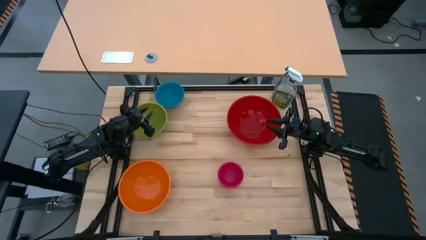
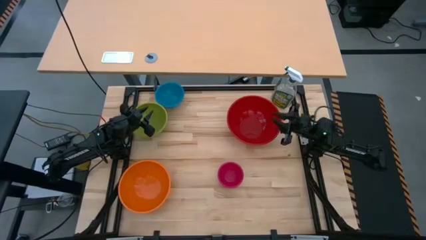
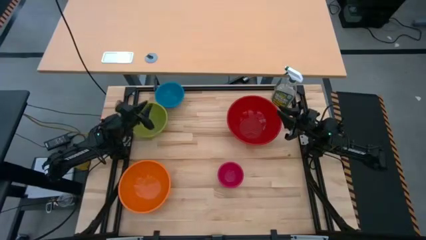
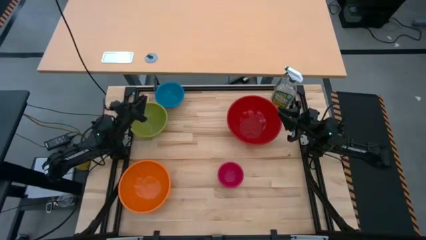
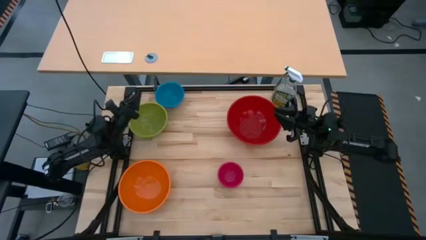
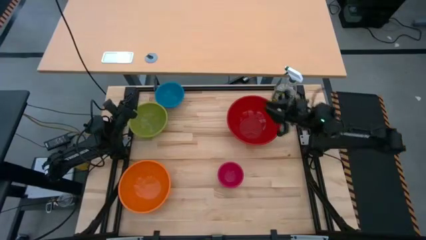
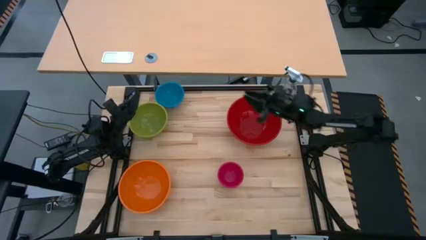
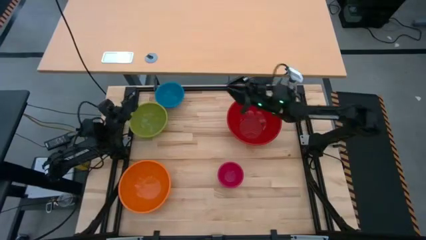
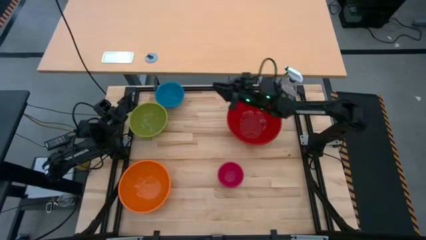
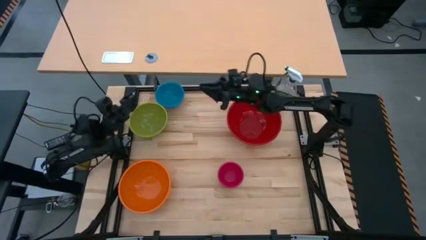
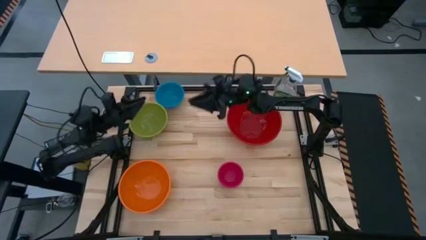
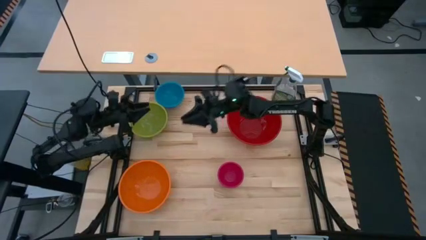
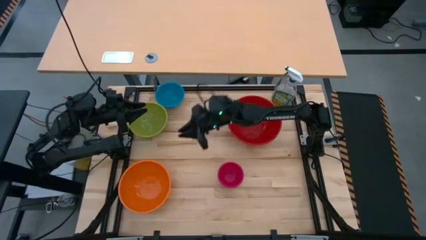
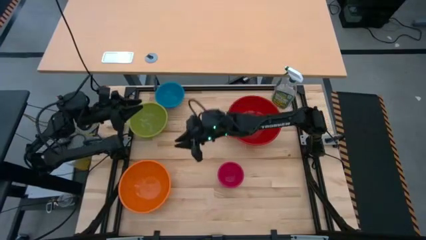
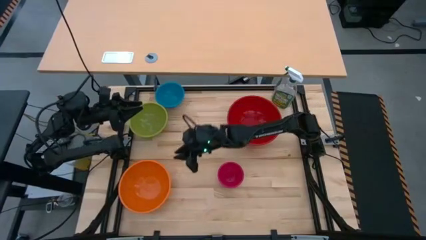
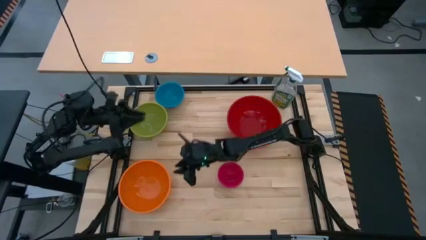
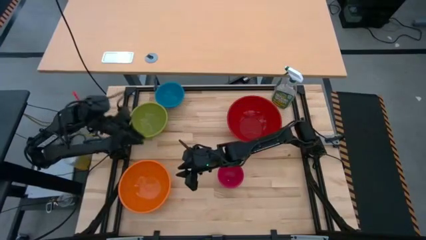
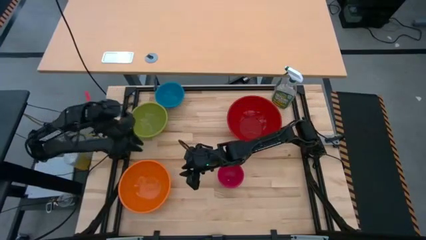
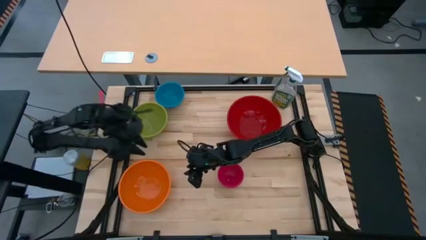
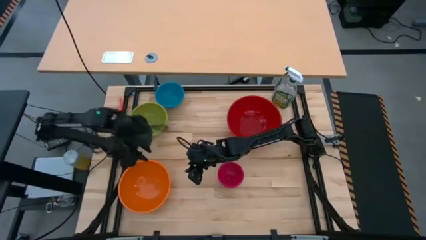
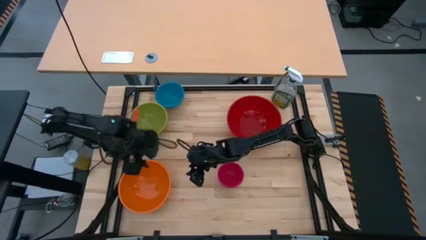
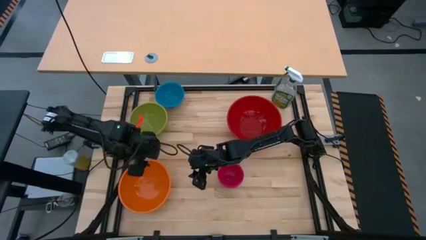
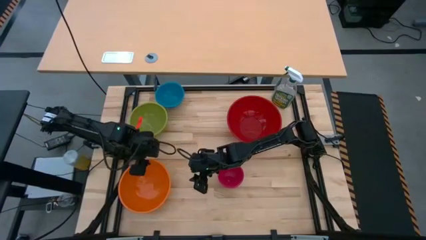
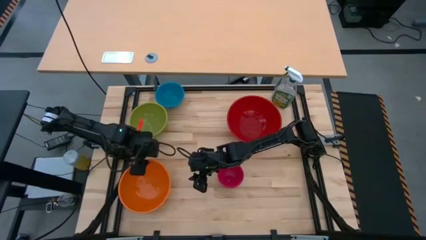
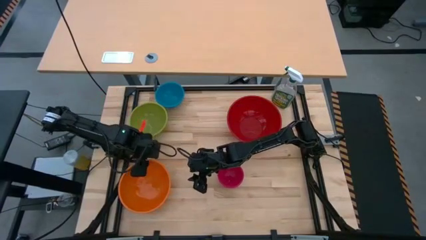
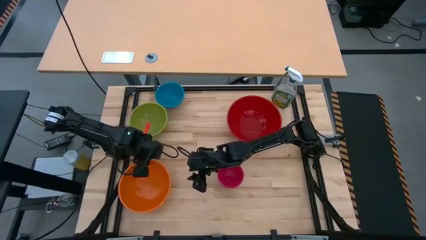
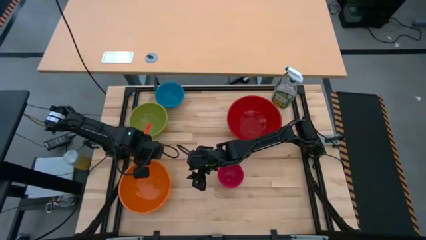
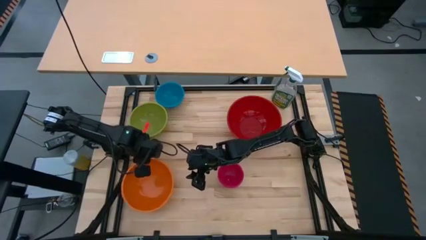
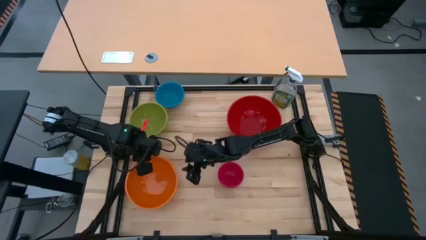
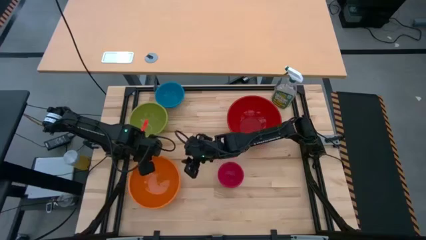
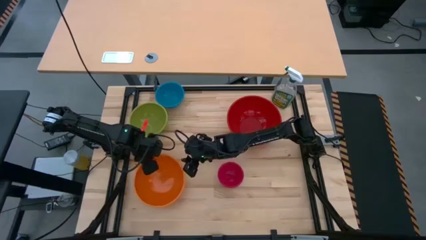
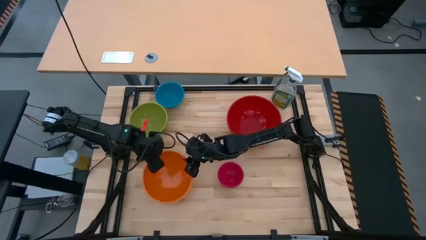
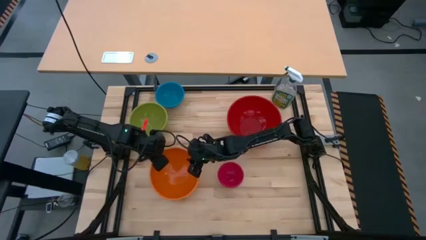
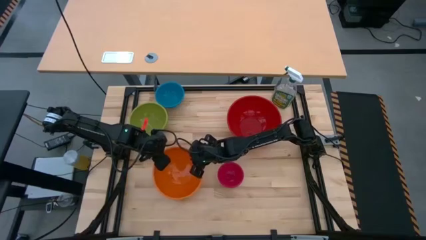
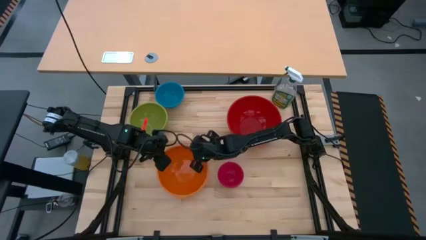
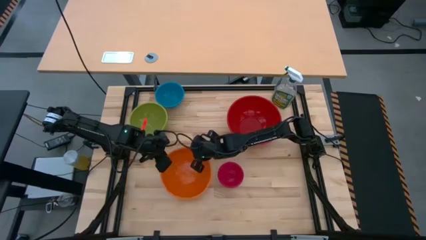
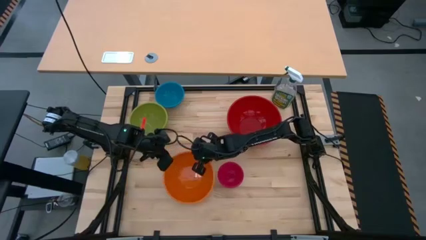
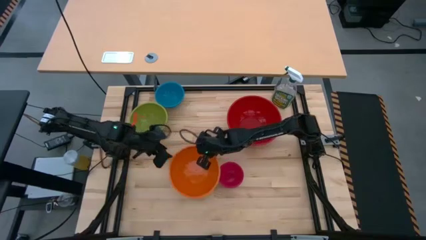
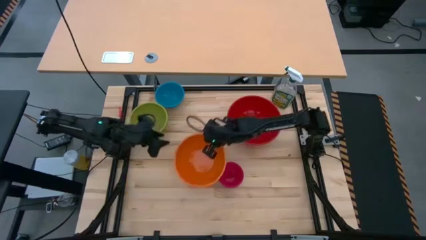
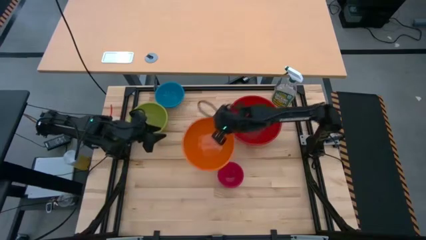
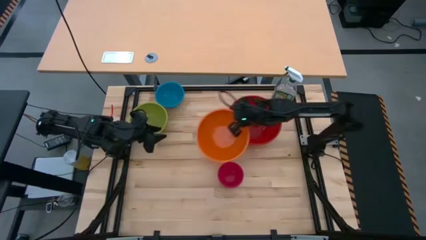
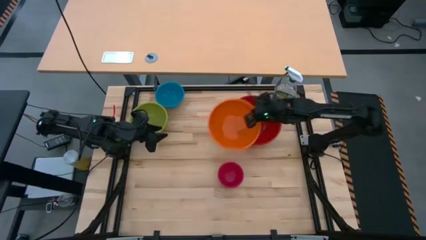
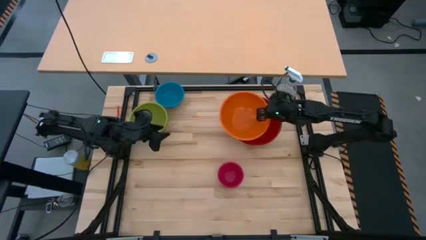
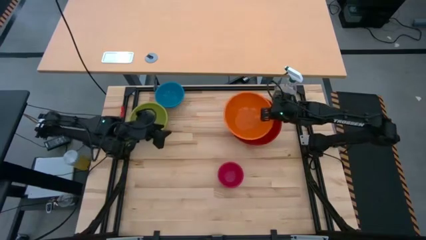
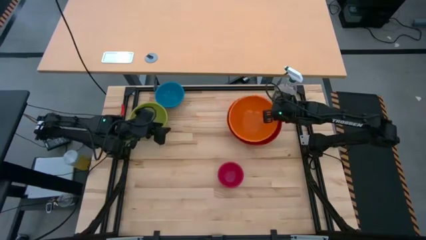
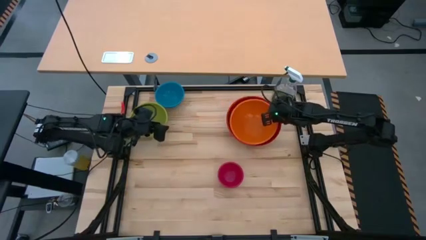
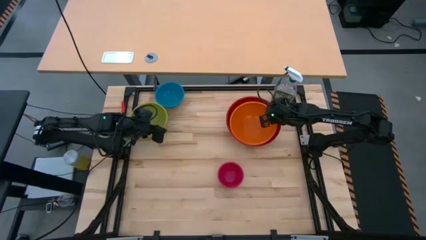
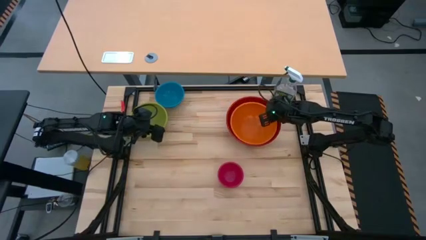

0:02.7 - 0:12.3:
Stack the orange bowl on top of the red bowl

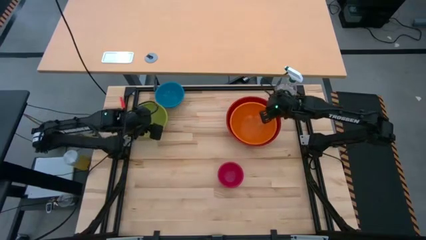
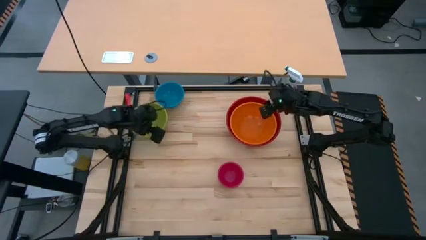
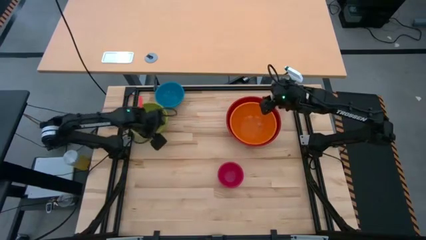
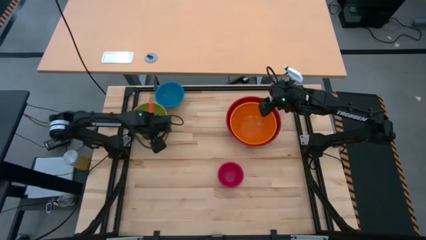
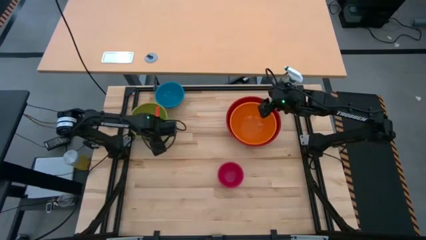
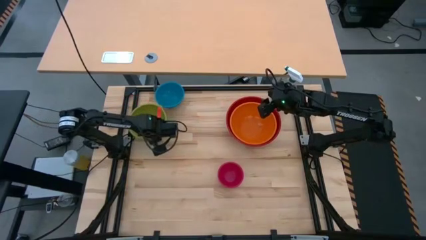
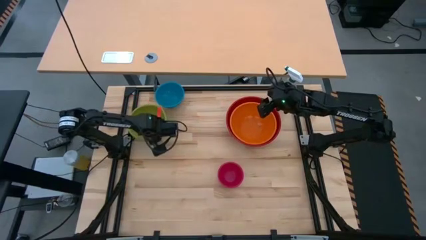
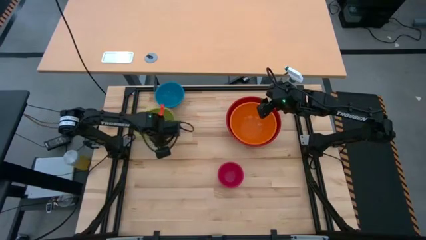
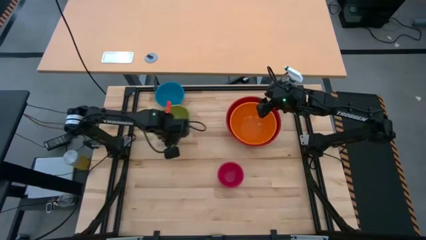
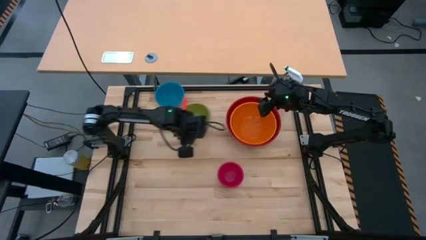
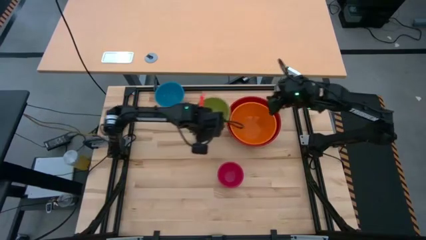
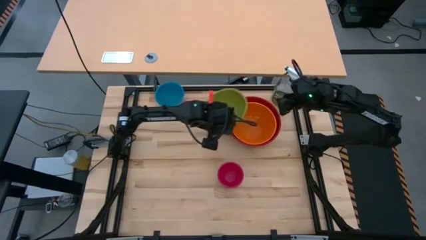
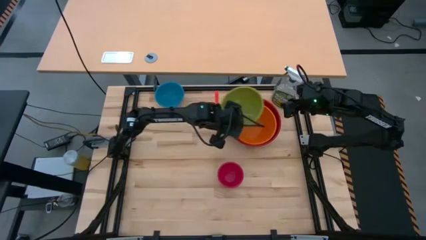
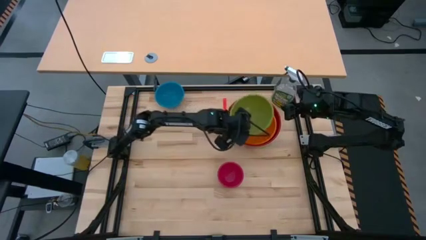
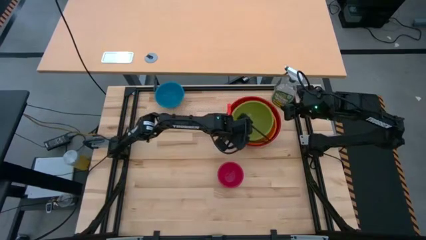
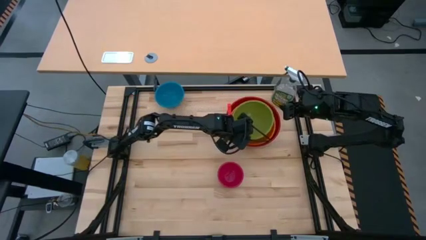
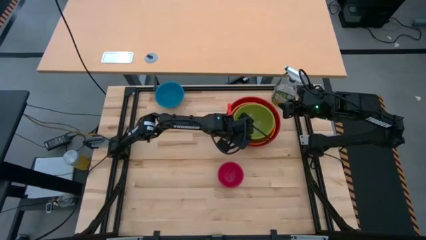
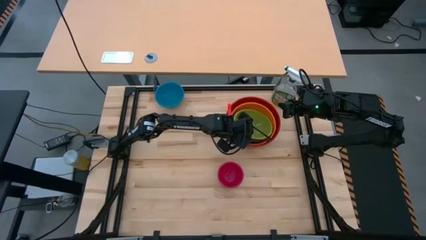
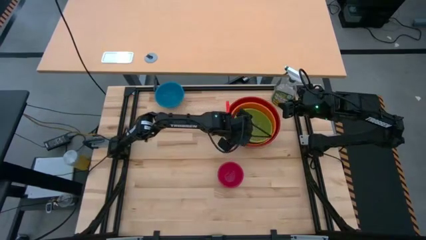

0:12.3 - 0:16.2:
Stack the green bowl on top of the orange bowl

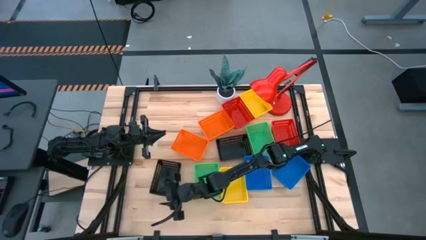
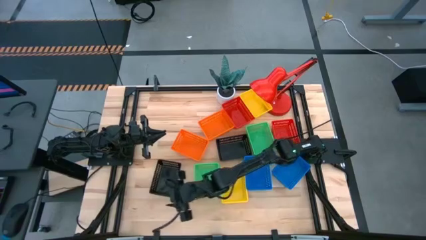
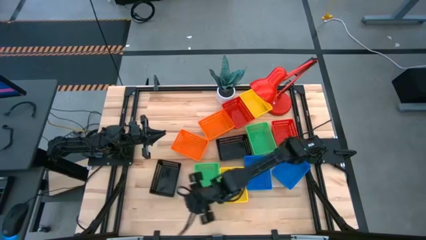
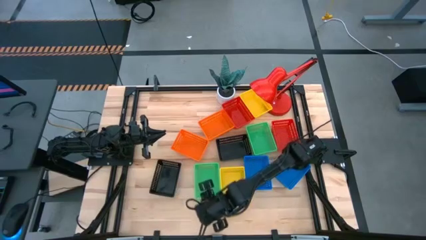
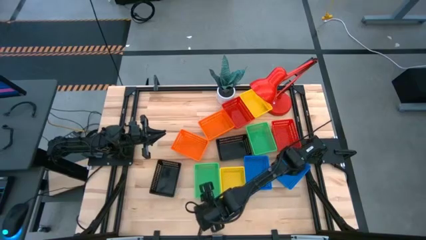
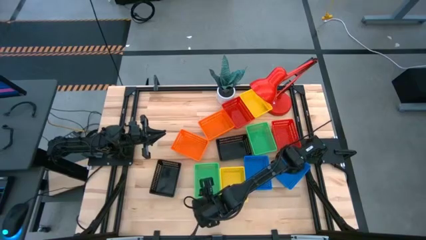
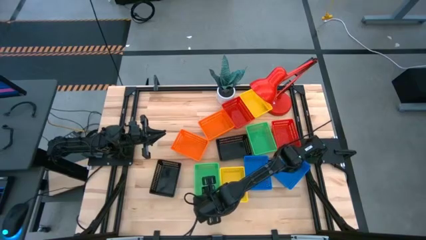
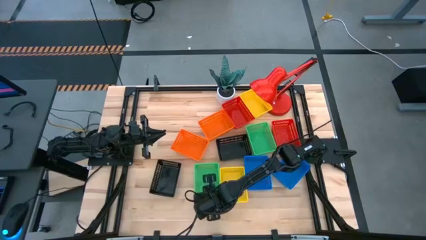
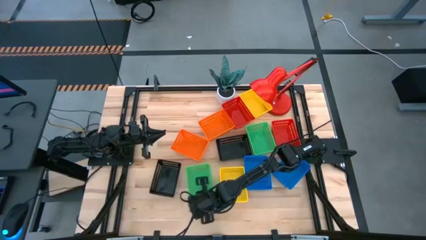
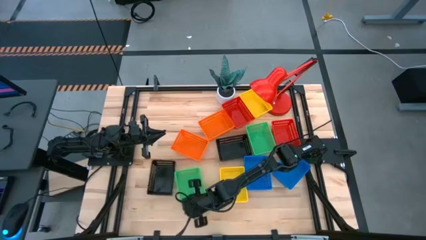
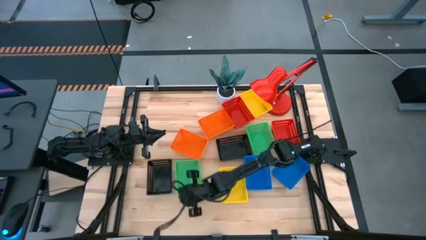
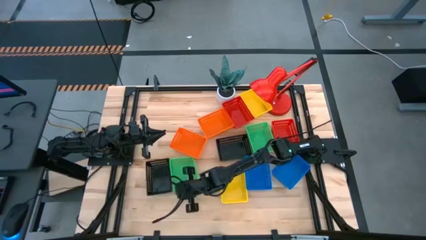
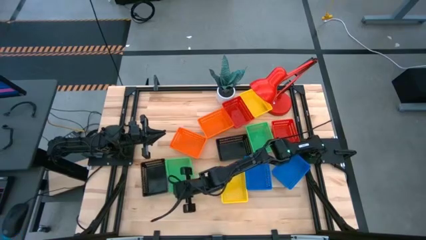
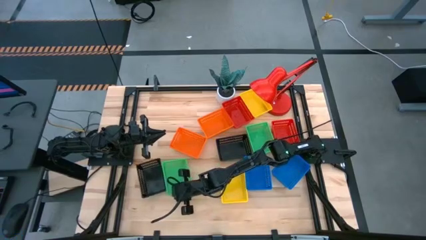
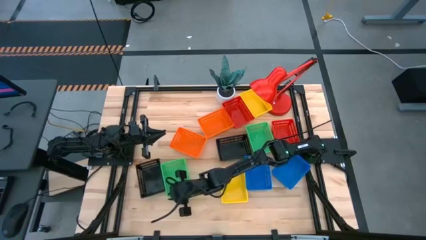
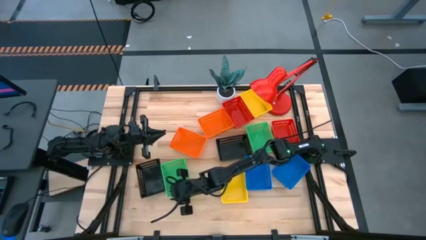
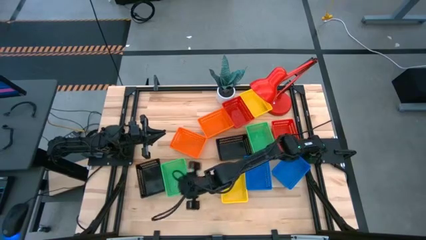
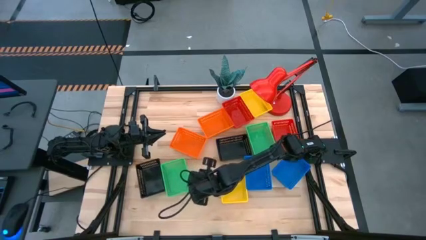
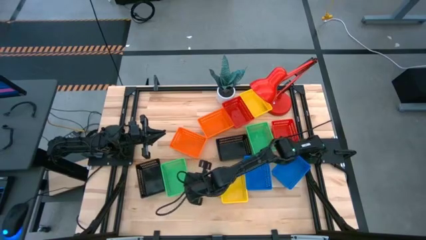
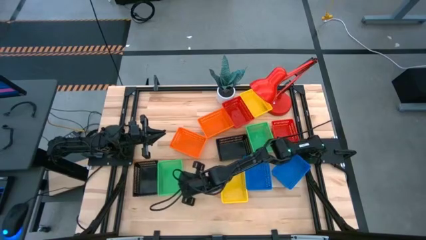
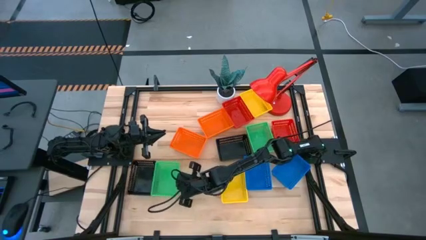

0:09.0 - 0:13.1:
Move the left green bin to the bottom left of the table
